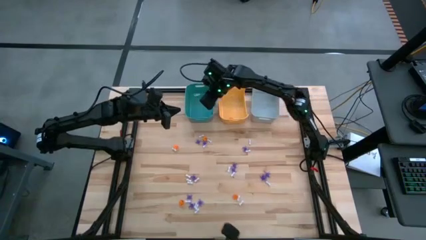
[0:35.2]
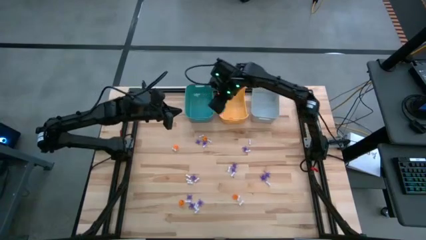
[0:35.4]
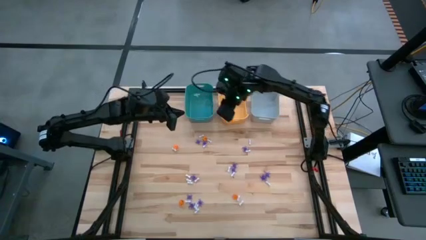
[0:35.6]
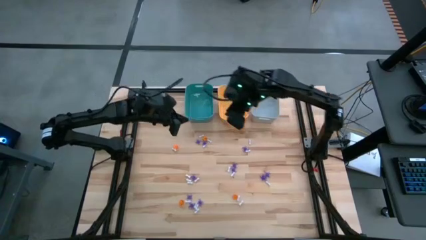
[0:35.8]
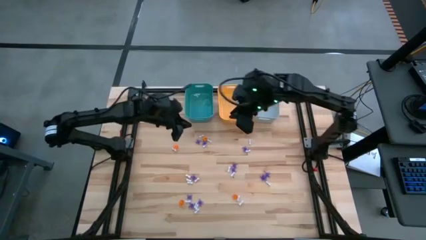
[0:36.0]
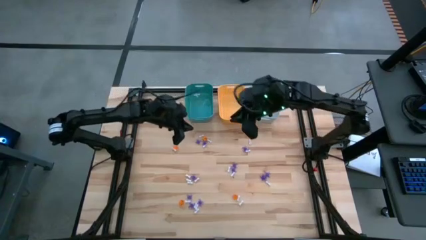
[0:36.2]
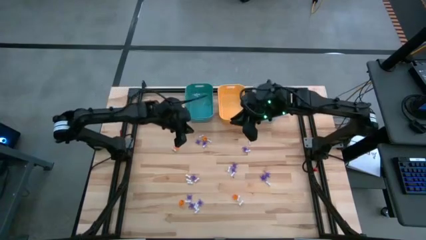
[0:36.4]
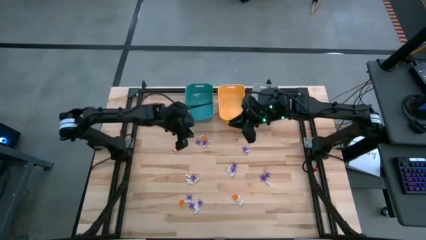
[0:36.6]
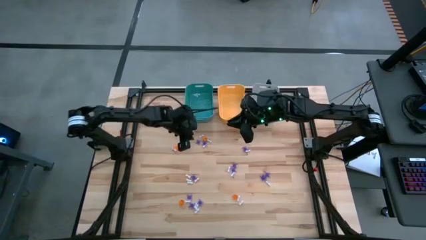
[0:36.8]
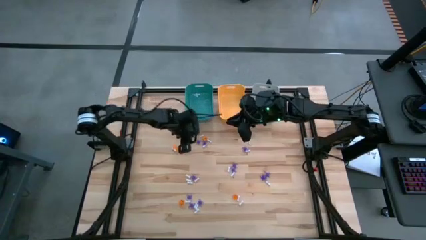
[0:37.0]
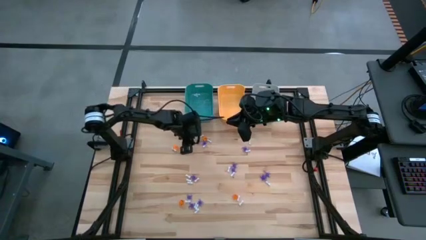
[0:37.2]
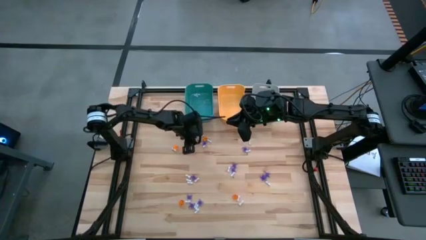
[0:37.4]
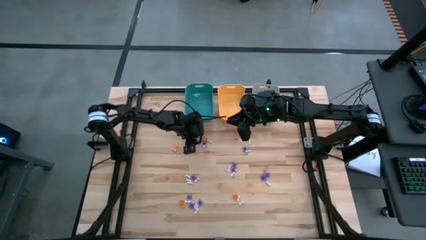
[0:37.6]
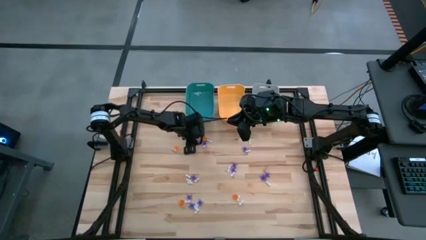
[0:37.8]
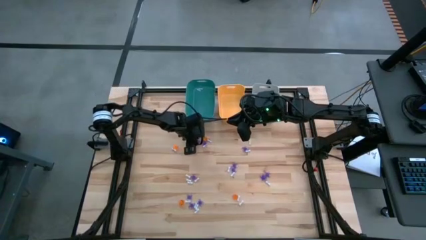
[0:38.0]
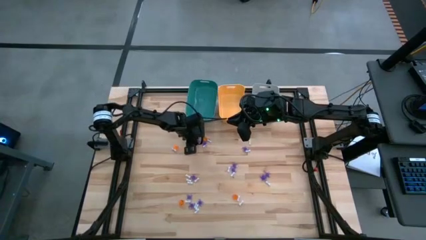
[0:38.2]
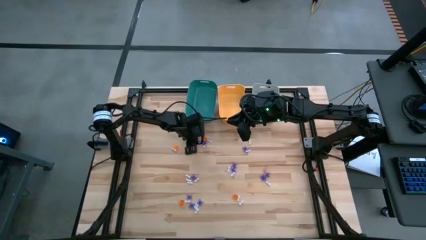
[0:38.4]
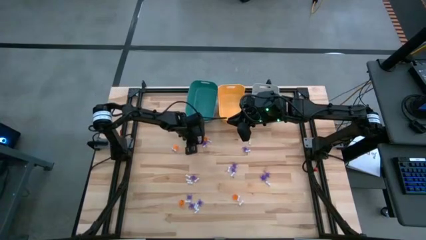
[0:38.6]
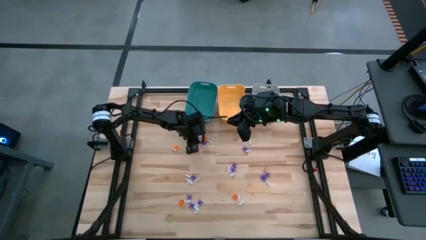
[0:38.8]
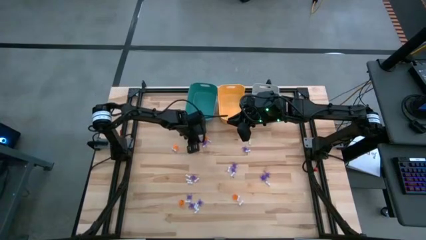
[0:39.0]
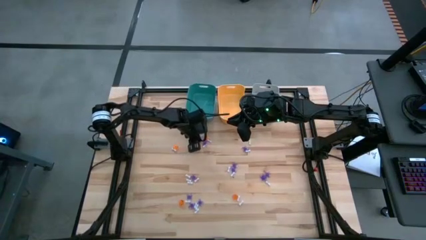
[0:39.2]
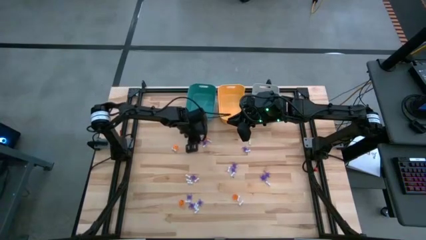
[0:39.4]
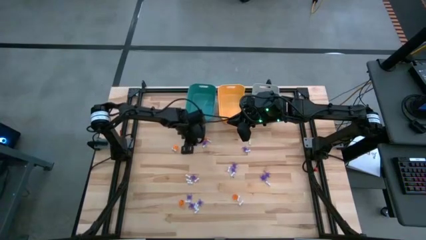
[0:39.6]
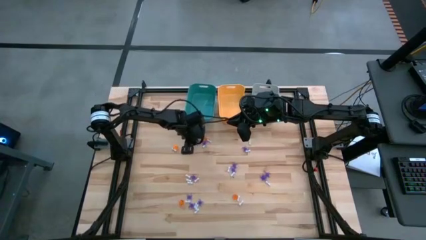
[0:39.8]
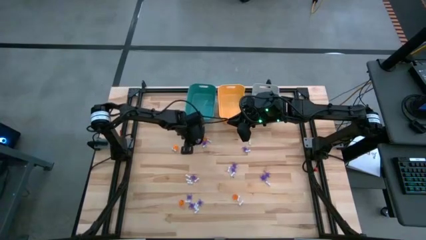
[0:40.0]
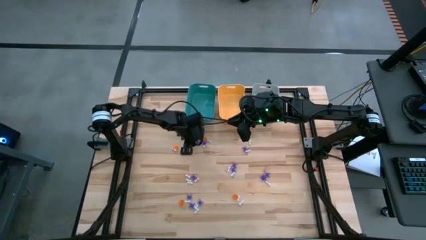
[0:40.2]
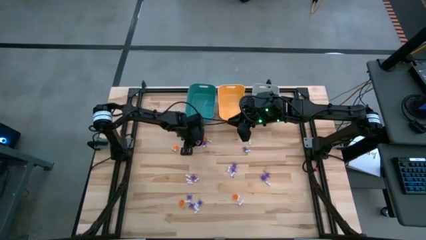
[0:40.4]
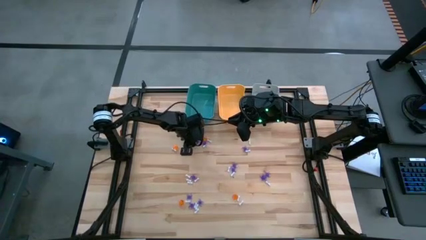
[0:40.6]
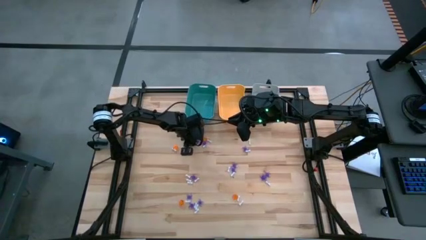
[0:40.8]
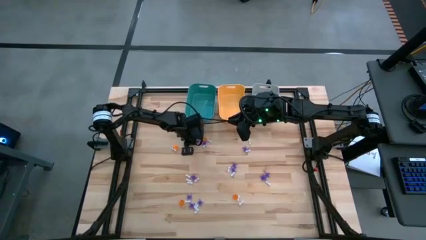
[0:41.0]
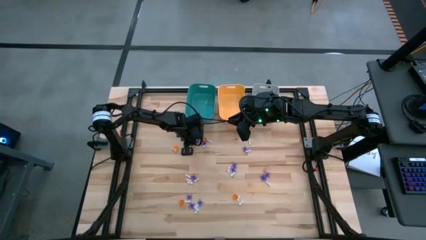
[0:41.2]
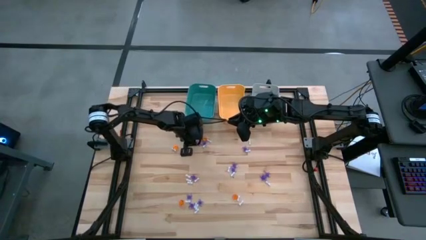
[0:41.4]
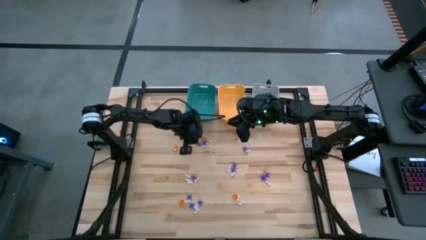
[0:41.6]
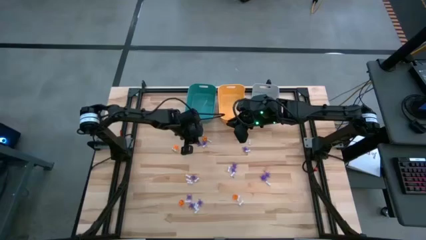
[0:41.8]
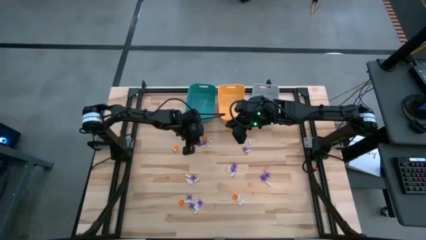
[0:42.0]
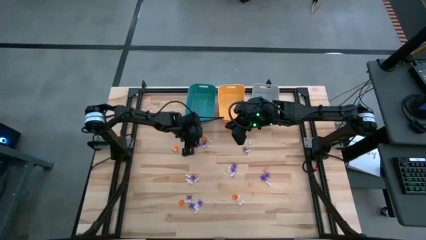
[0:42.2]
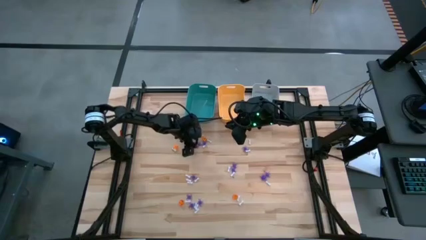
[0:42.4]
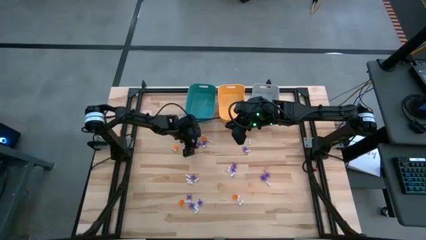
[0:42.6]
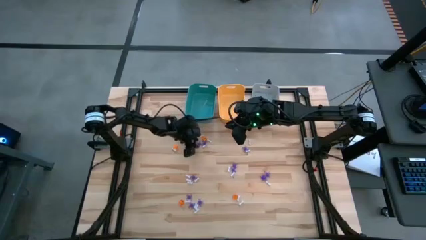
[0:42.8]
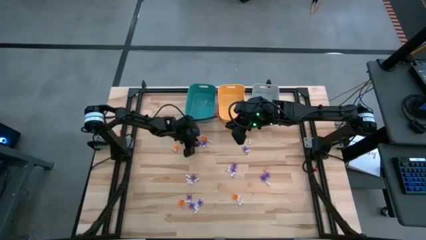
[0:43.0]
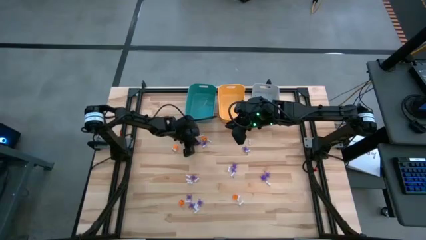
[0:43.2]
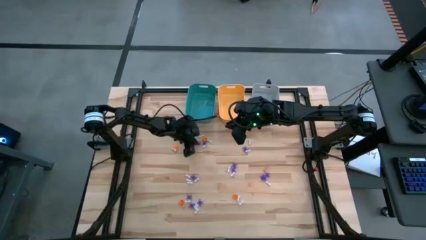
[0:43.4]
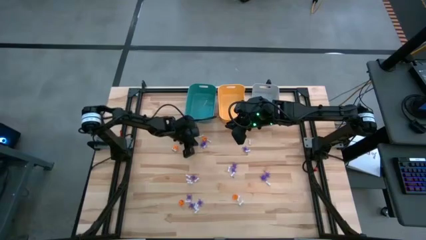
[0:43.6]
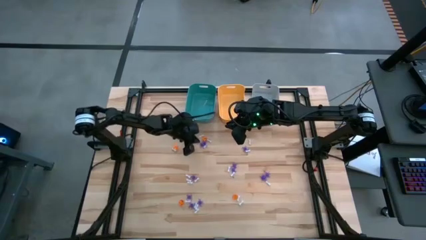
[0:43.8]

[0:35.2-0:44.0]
Task: Sort Halloween decoration
Put the purple spider toy into the gray bin

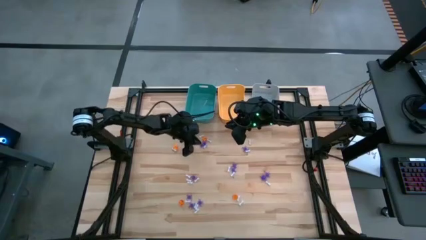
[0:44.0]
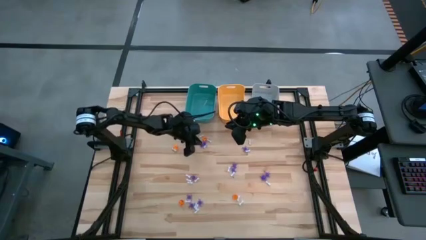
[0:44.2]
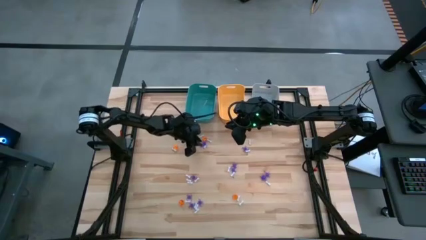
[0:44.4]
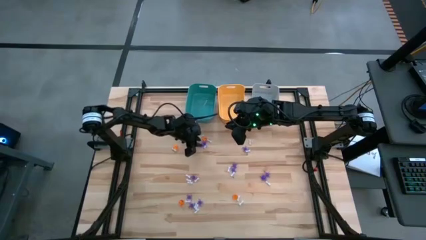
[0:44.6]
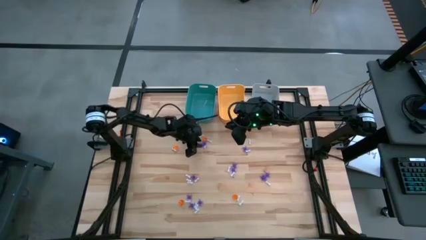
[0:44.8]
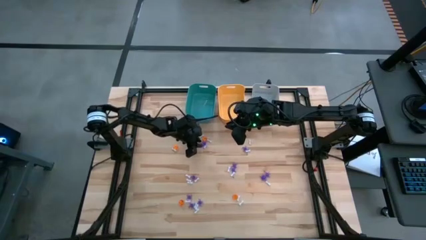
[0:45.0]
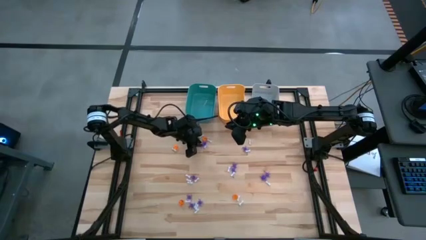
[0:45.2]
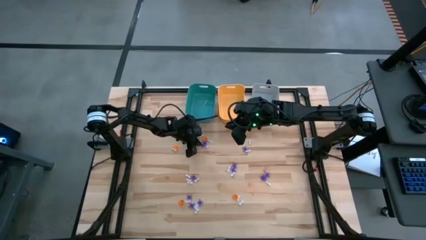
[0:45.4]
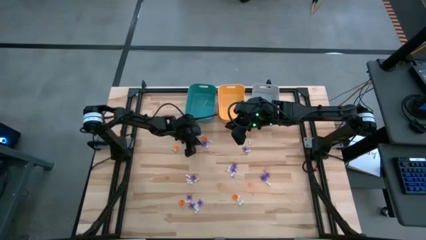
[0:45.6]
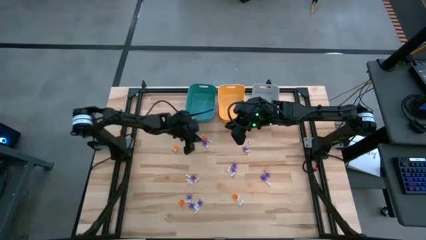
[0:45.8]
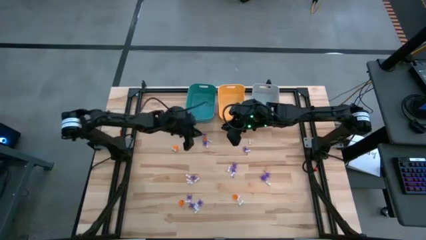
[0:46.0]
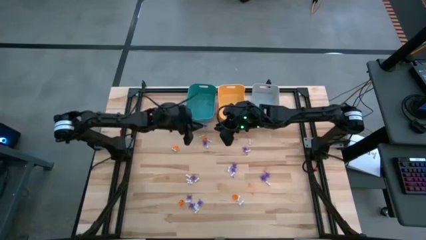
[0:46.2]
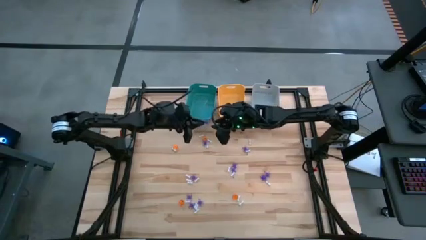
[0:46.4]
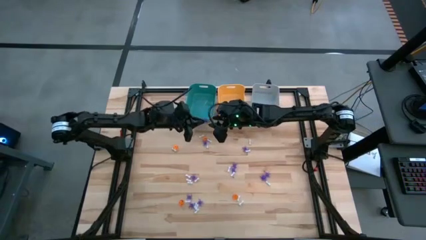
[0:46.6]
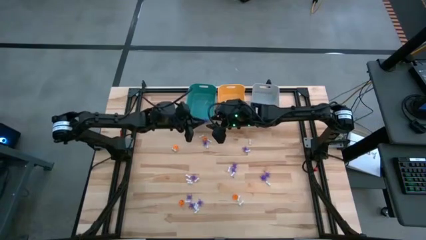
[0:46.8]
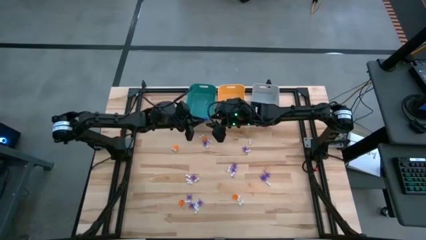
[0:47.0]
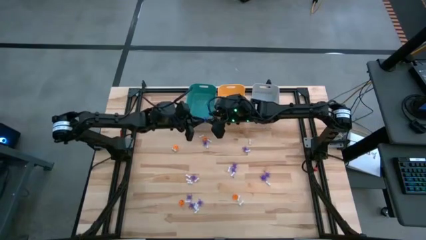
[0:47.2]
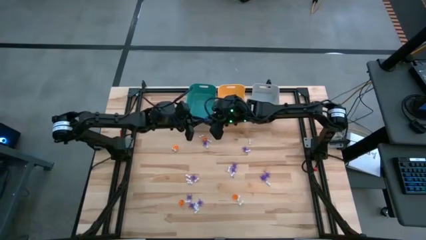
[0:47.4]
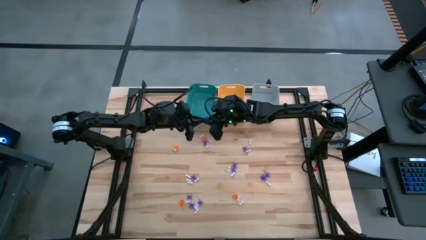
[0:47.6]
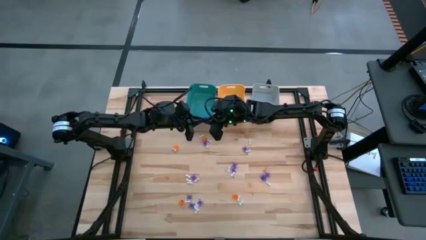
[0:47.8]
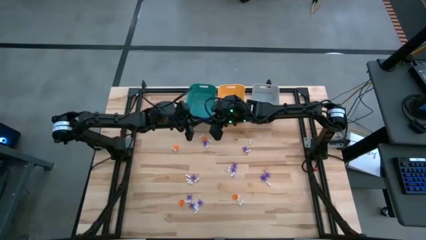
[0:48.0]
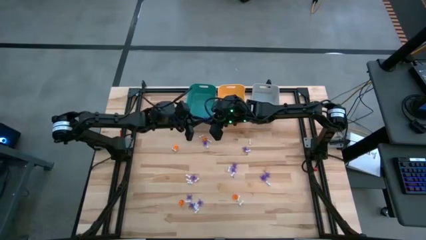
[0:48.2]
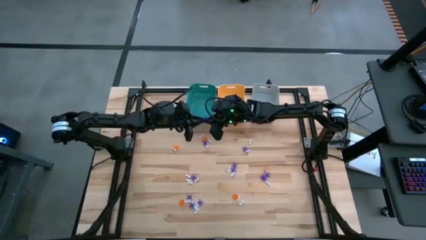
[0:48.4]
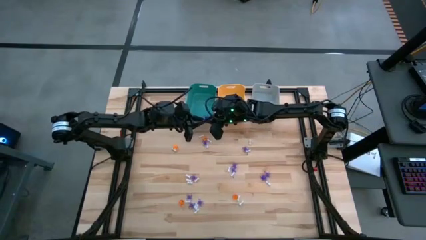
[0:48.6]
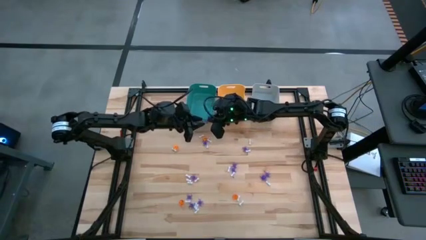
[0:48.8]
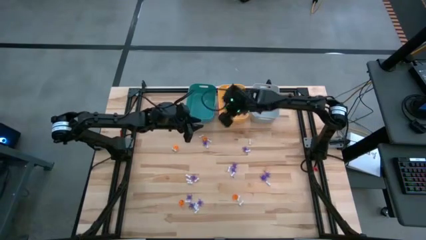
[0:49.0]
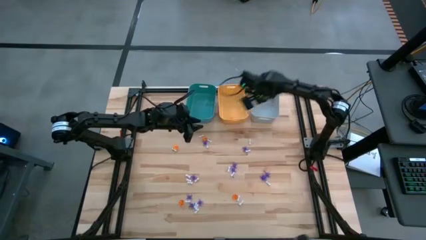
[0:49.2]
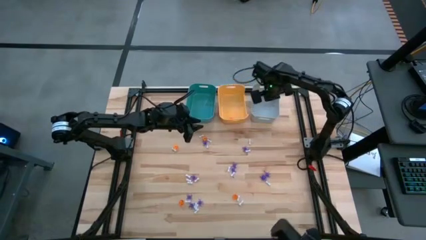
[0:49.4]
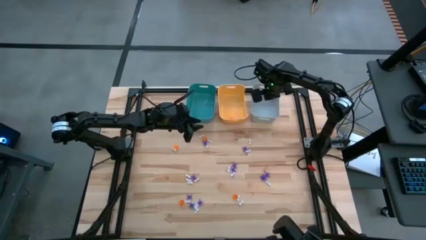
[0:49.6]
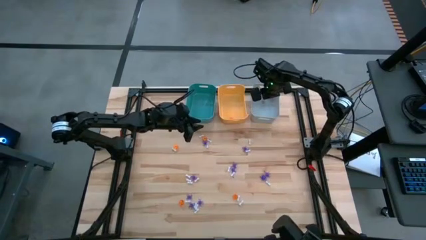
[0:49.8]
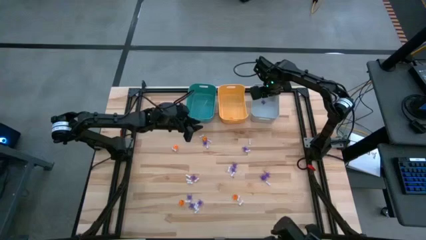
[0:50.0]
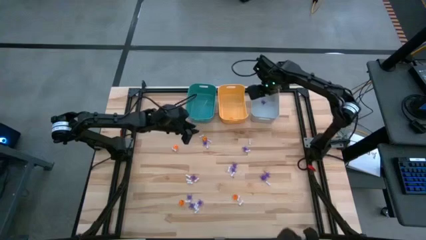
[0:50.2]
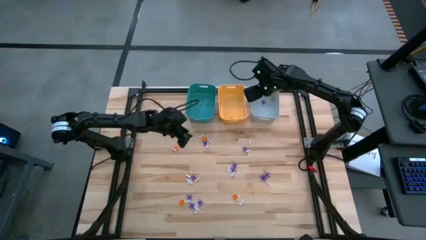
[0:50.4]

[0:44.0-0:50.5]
Put the purple spider toy into the gray bin
